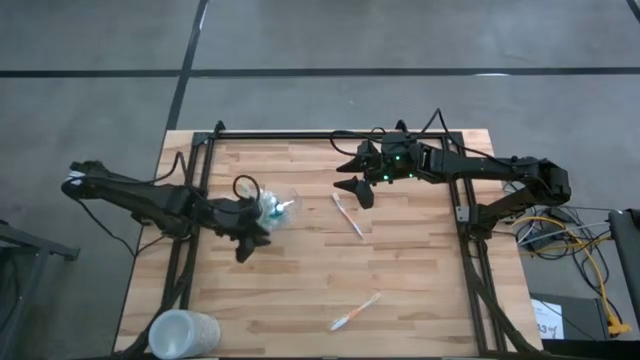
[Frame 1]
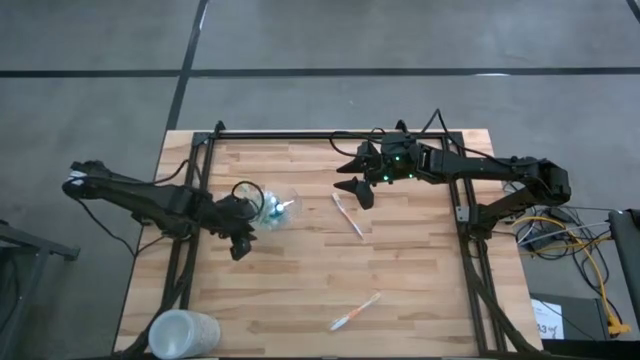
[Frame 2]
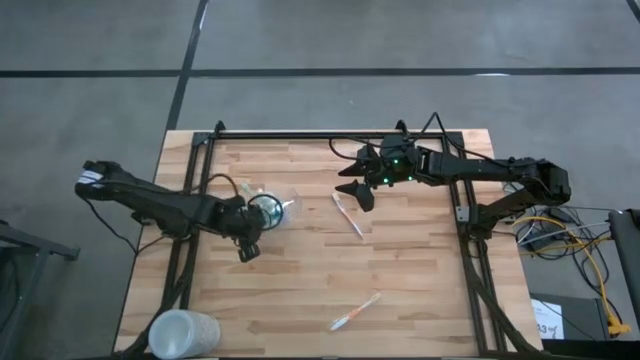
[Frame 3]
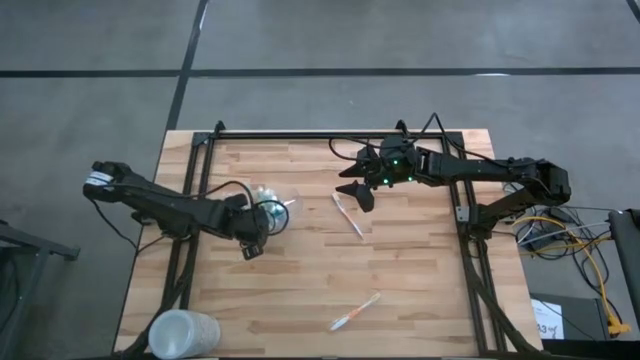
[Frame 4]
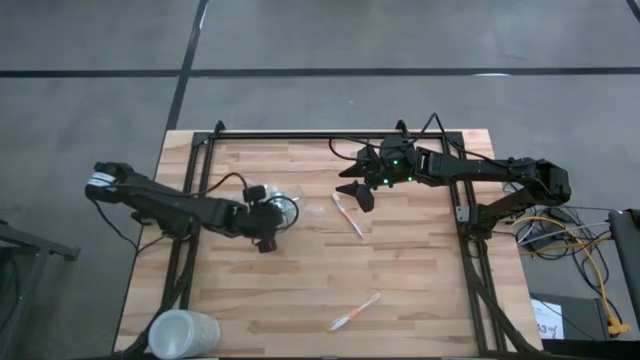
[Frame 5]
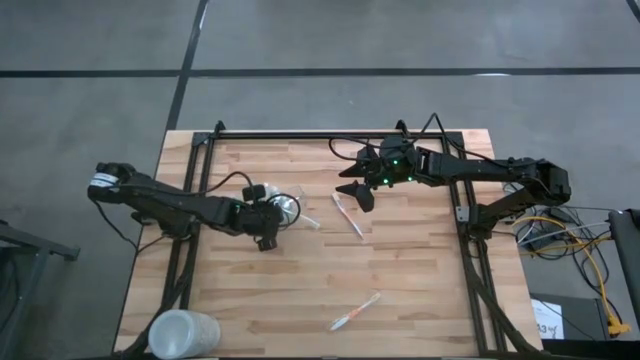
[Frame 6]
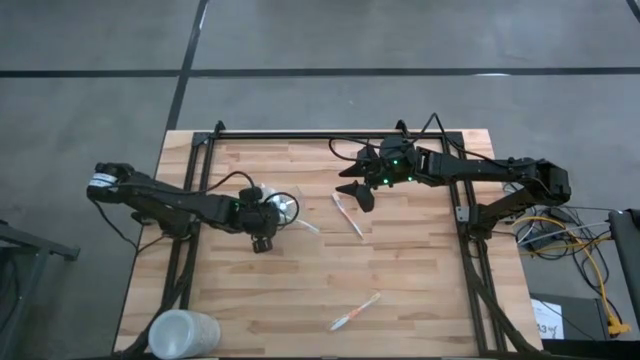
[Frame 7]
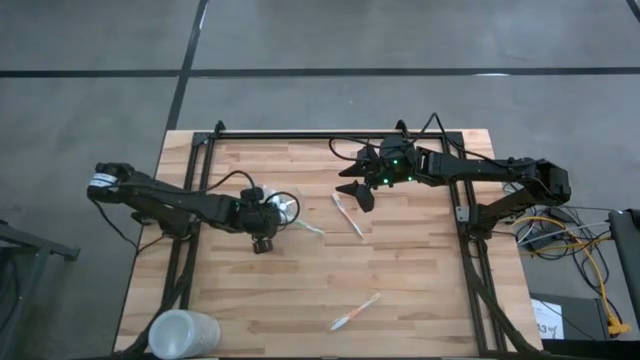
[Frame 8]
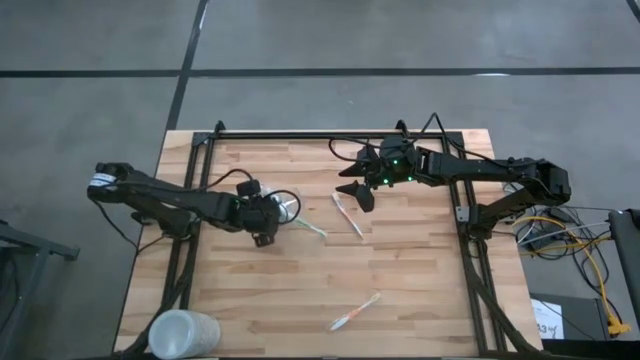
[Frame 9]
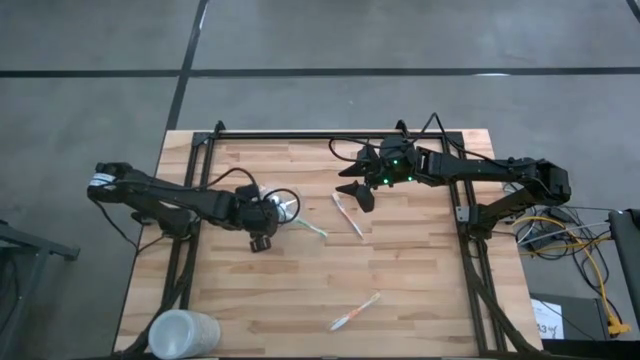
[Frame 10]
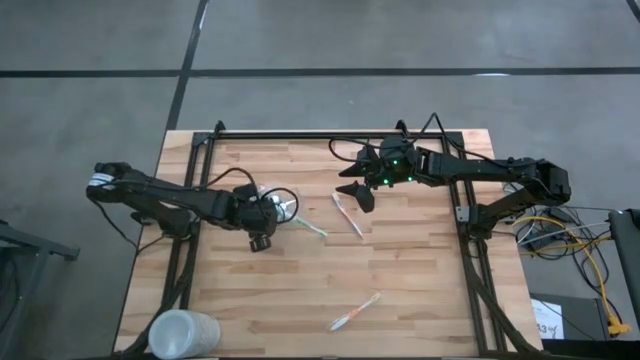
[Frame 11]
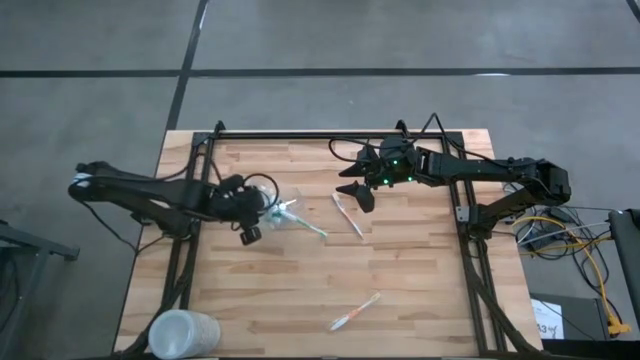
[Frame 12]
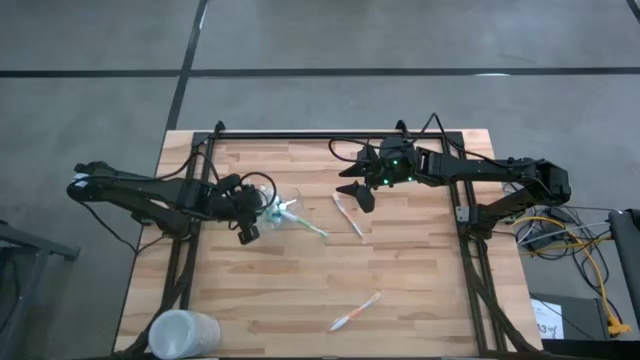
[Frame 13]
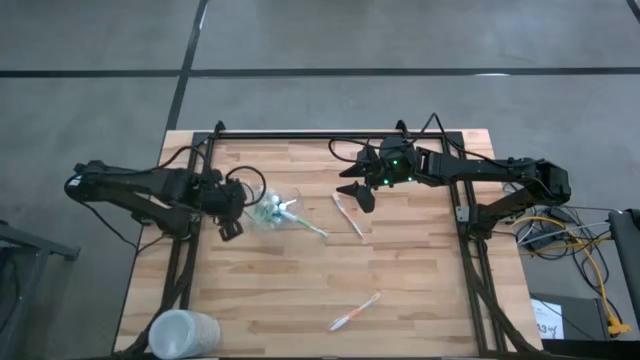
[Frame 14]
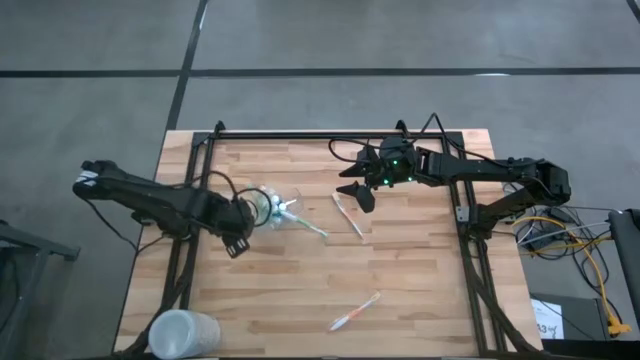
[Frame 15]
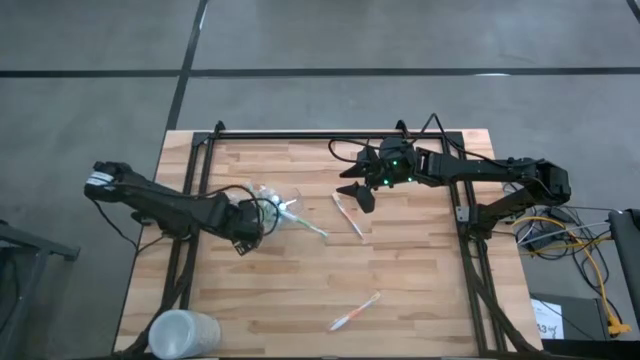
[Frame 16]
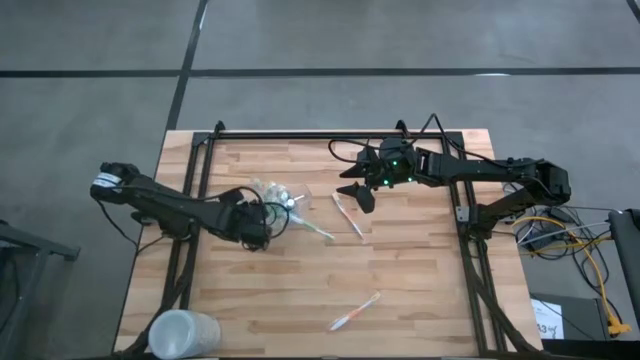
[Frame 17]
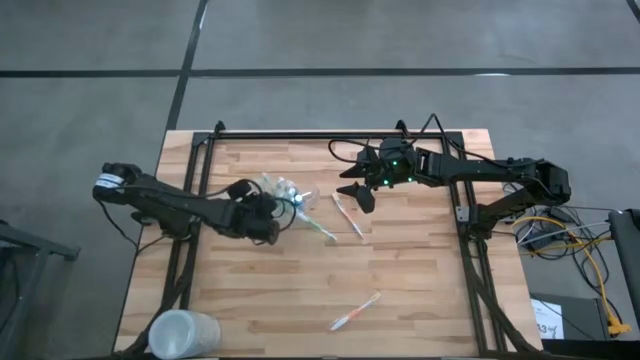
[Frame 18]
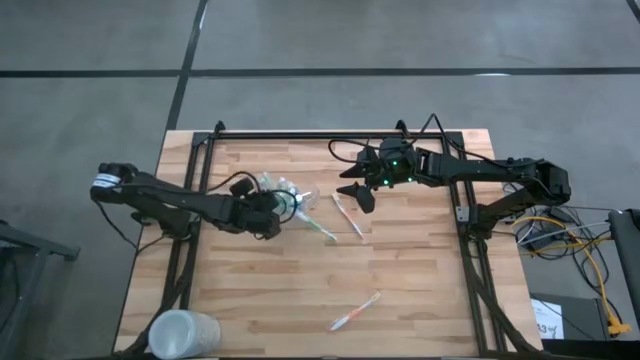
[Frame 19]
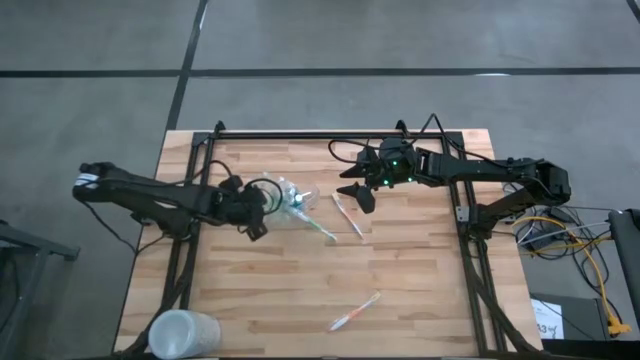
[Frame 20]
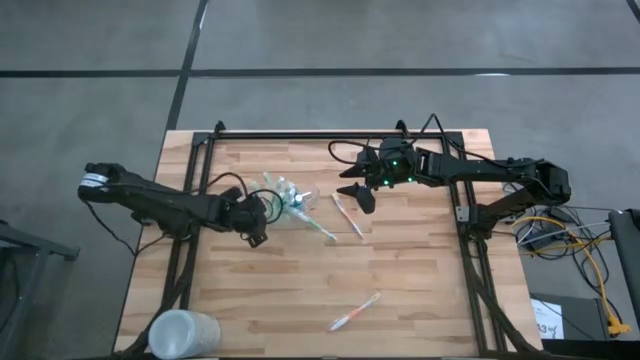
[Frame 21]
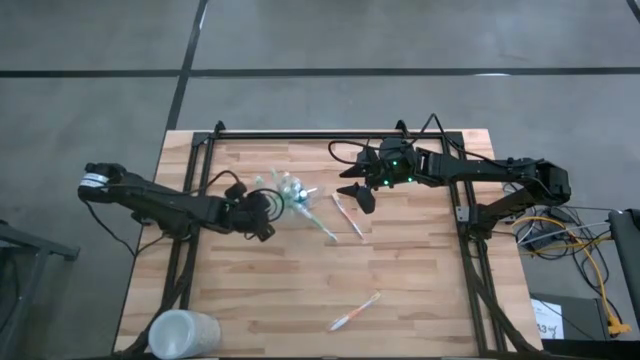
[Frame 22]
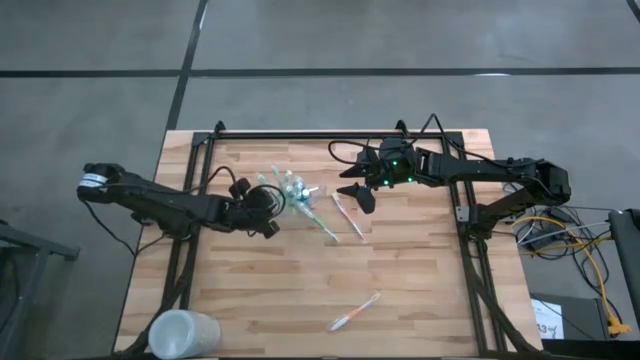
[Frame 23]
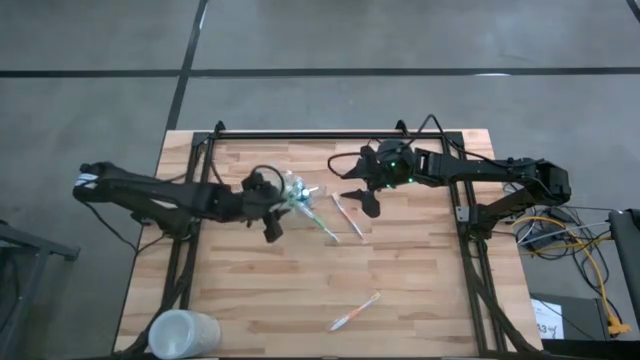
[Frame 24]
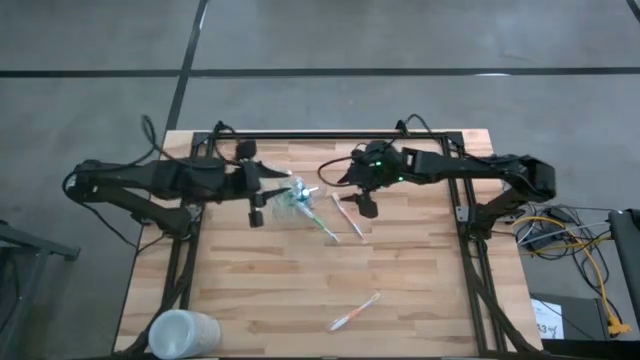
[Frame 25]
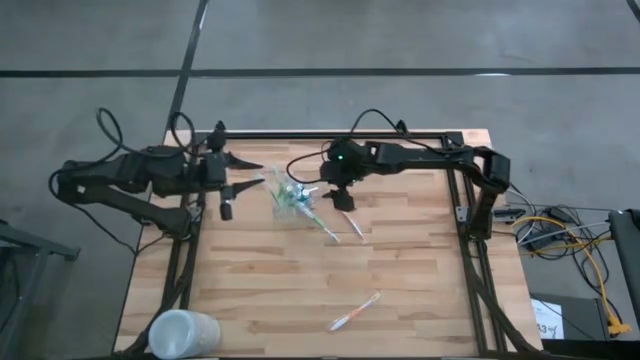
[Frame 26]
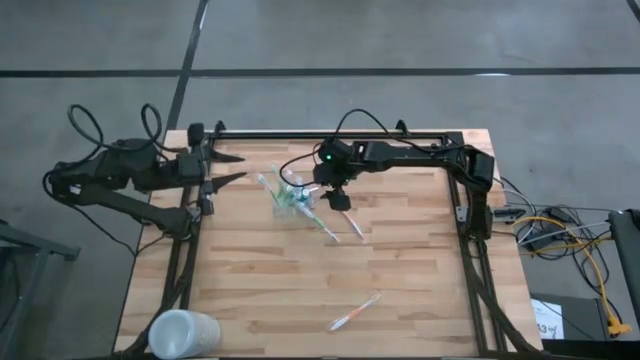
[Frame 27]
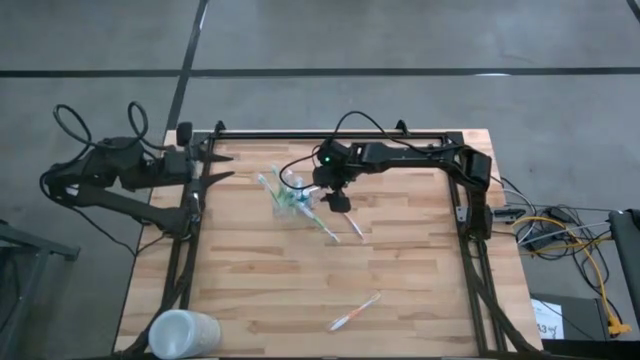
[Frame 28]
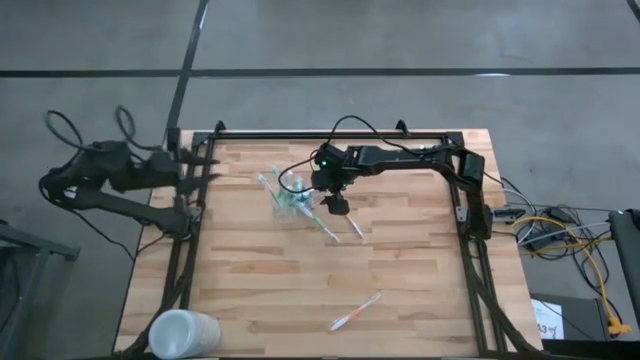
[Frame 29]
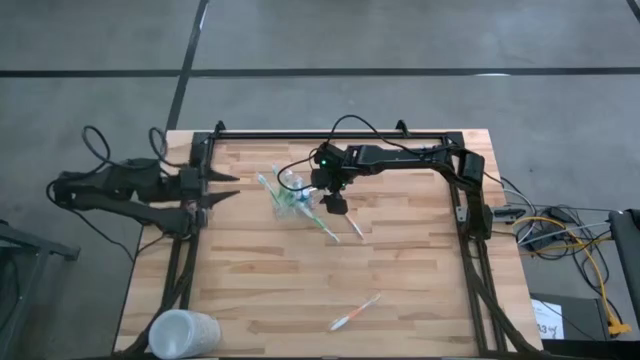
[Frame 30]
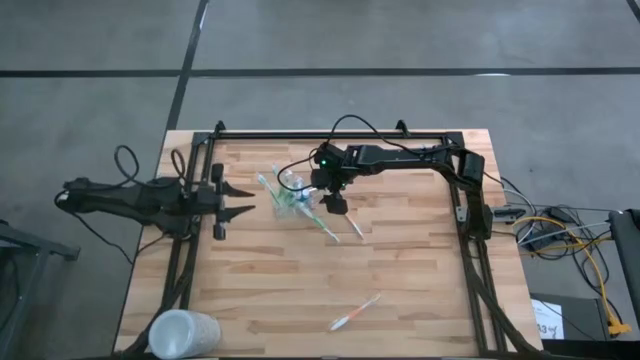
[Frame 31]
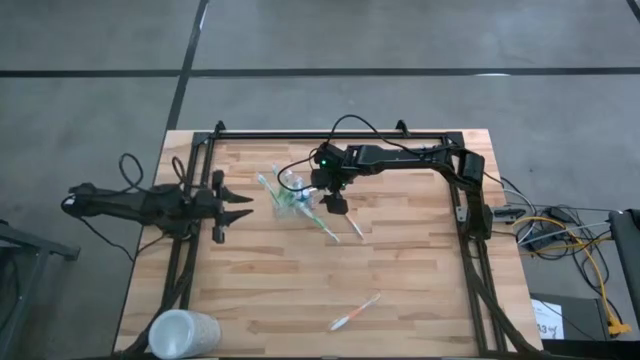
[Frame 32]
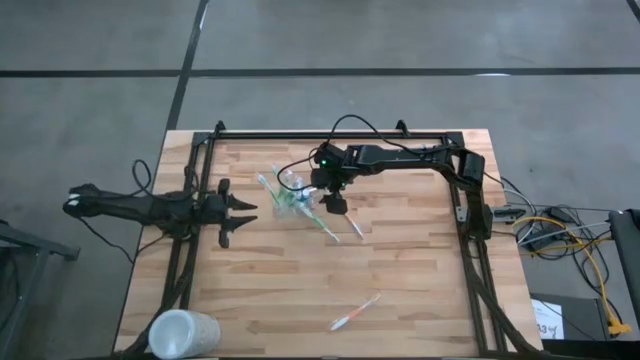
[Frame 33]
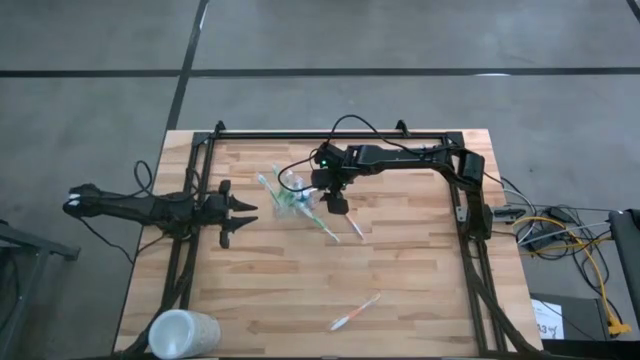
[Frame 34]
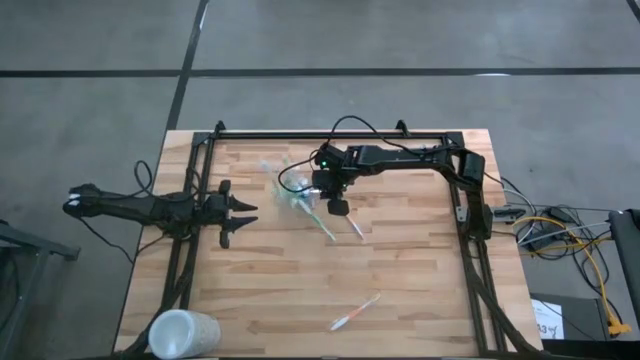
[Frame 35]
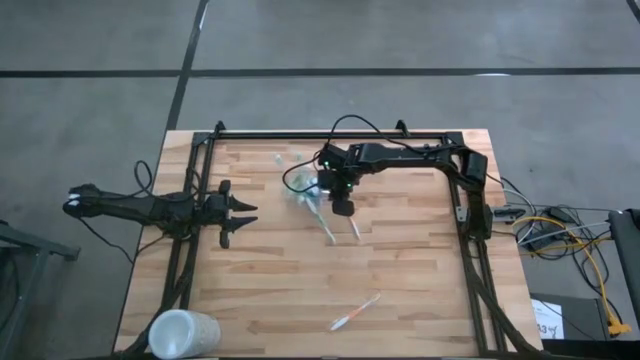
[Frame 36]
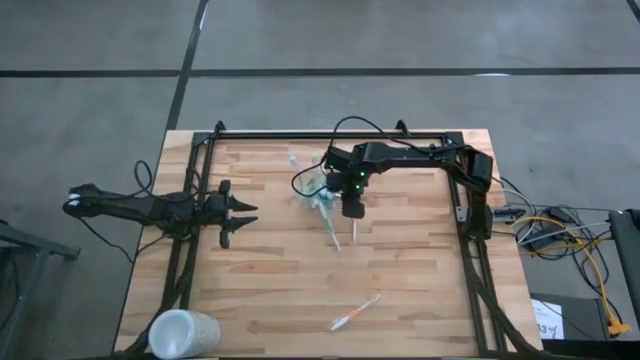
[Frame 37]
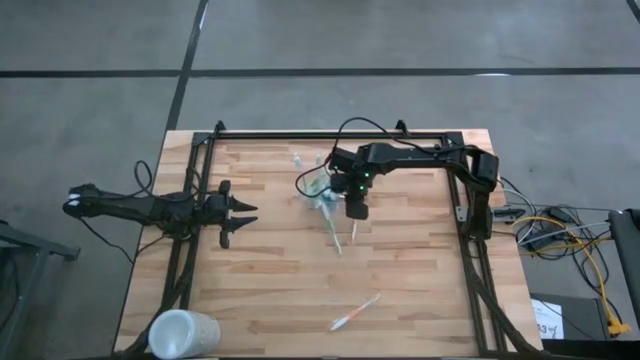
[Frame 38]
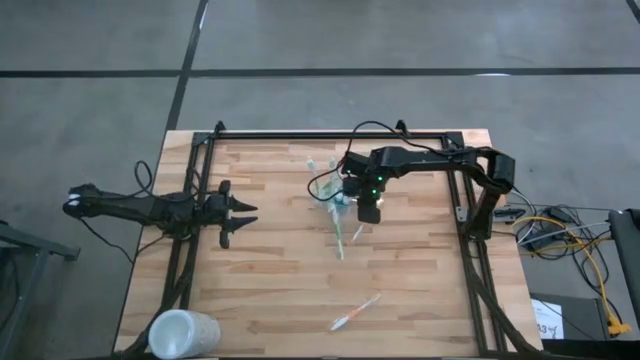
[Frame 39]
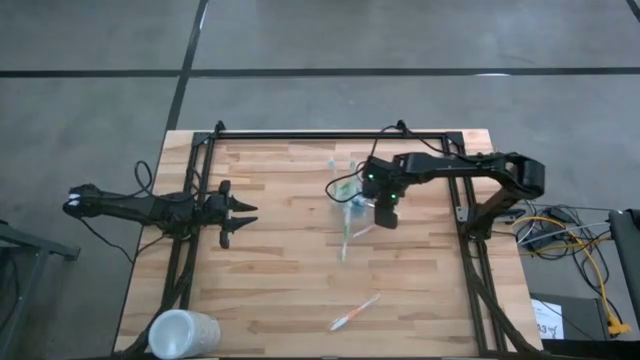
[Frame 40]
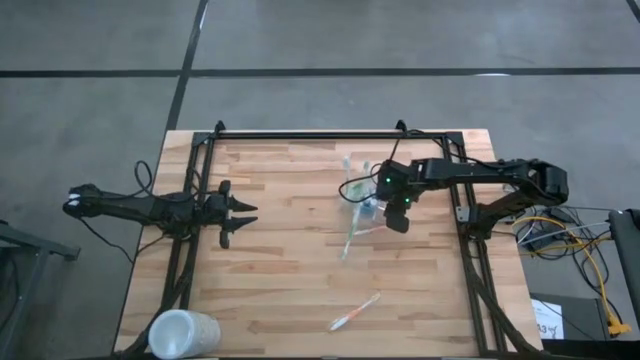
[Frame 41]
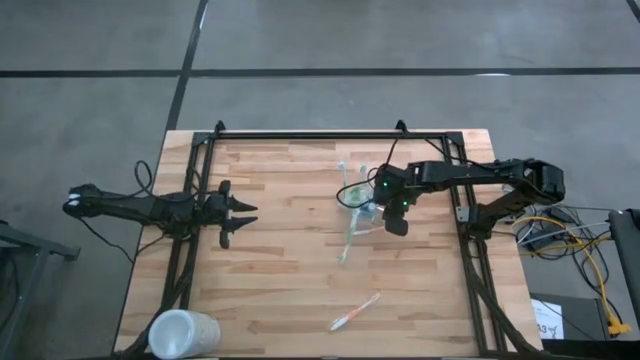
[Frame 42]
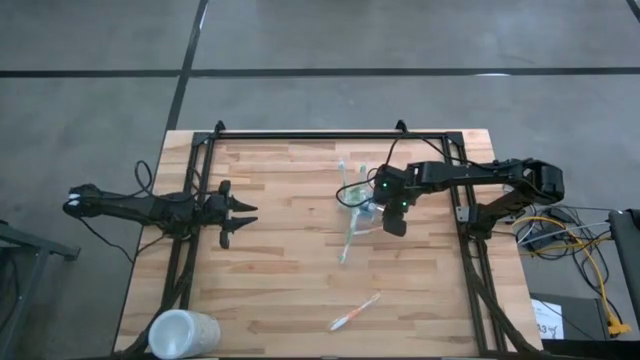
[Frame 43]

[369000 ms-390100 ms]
Task: Pick & Place toothbrushing station
Move the transparent organizer to the center of the table
